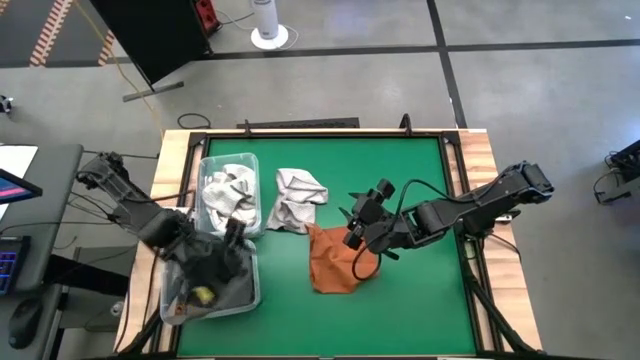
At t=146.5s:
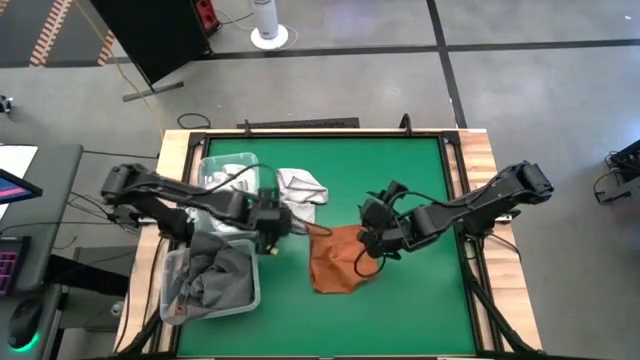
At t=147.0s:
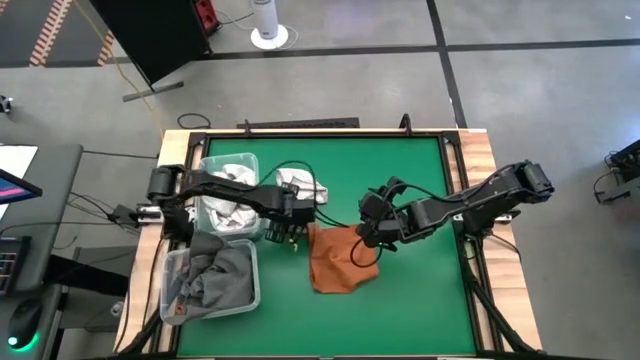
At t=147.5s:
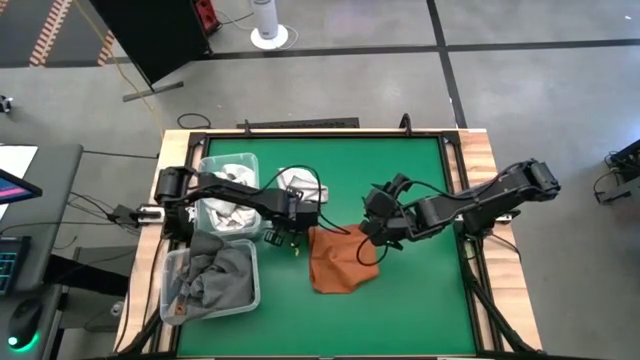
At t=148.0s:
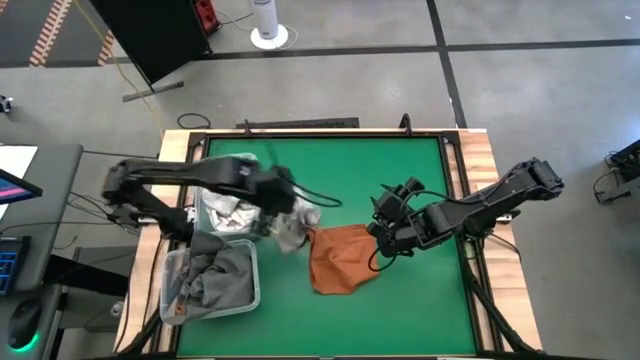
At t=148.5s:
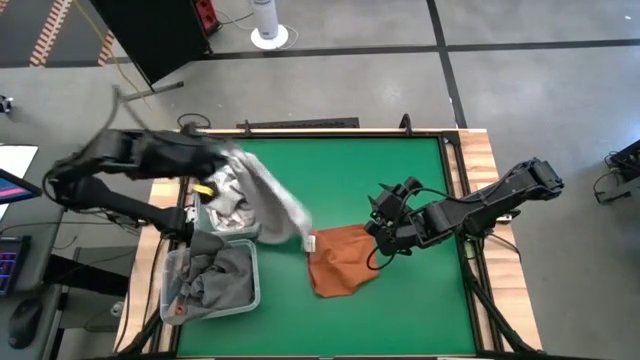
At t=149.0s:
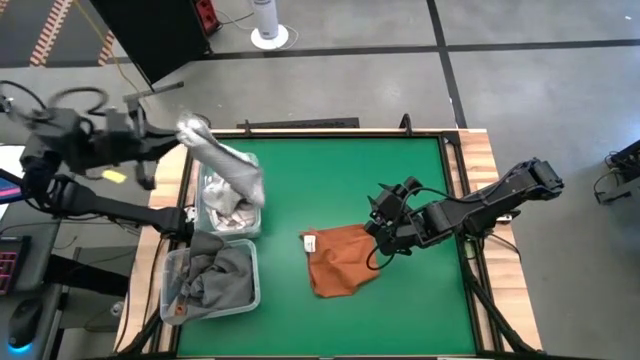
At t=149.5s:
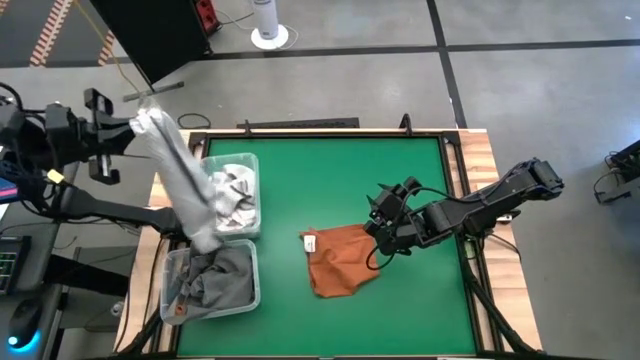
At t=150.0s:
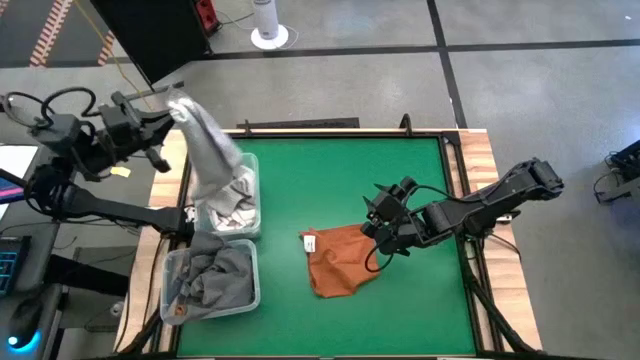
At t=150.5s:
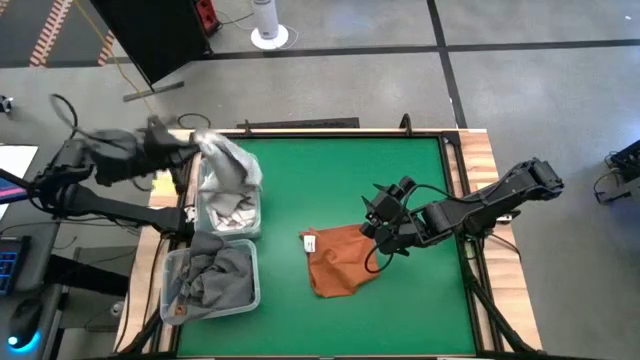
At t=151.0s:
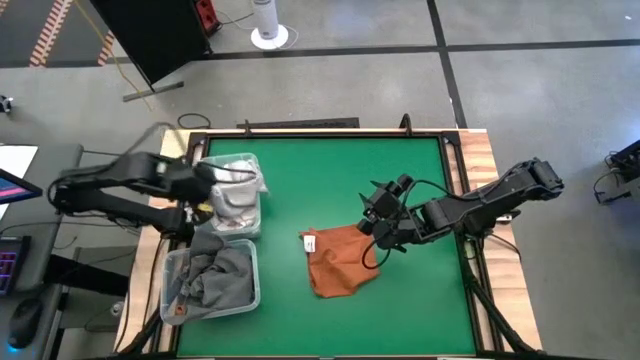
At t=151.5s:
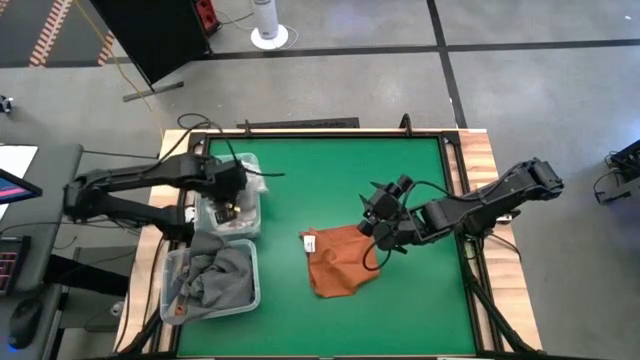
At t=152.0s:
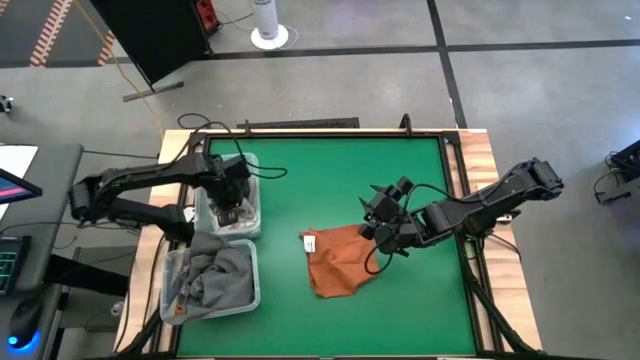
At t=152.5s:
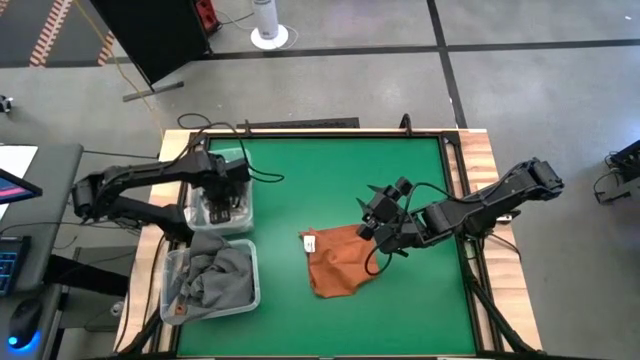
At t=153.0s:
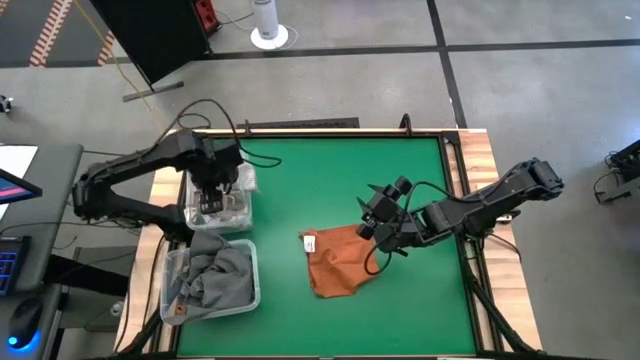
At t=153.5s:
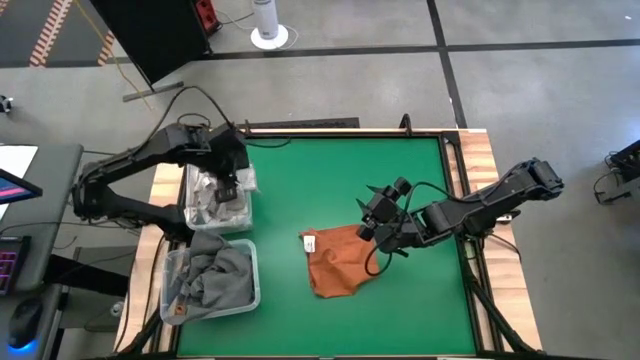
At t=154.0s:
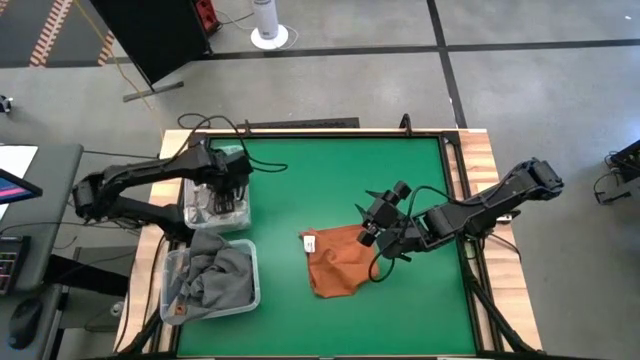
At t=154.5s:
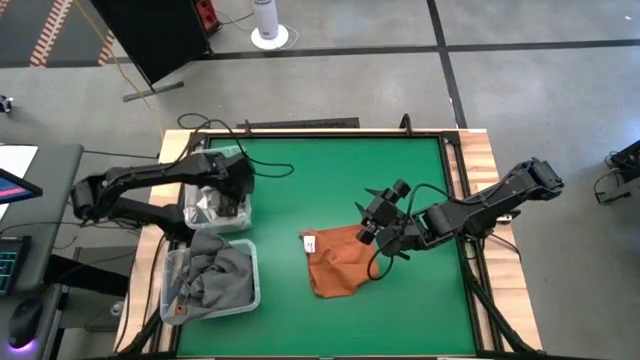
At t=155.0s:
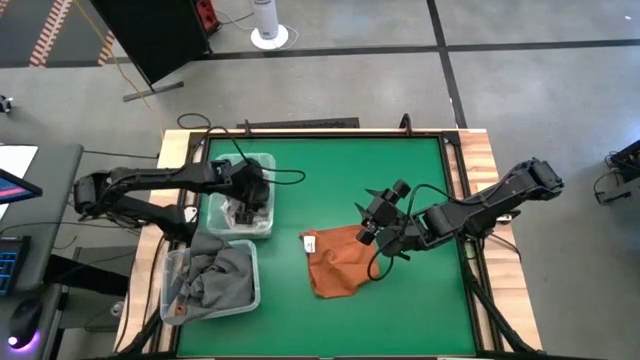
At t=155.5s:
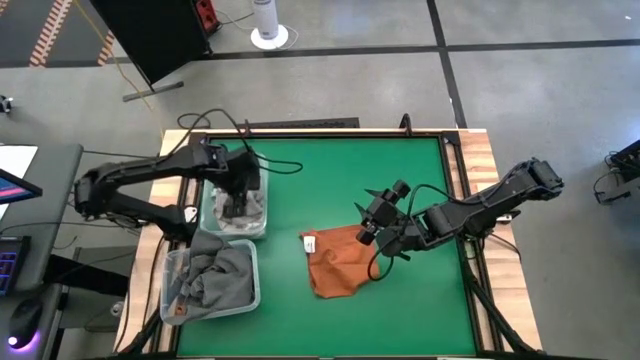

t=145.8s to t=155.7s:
Task: Sort towels by color in basket
Put the white towel into the top transparent bin

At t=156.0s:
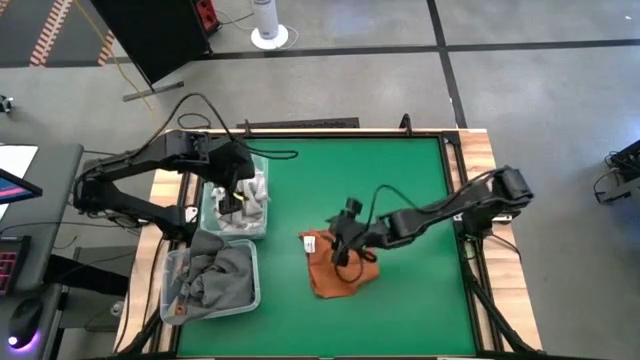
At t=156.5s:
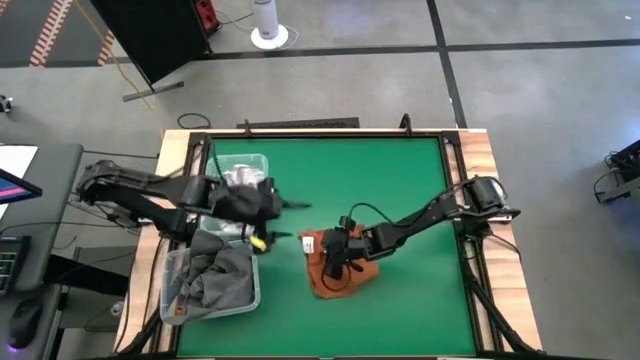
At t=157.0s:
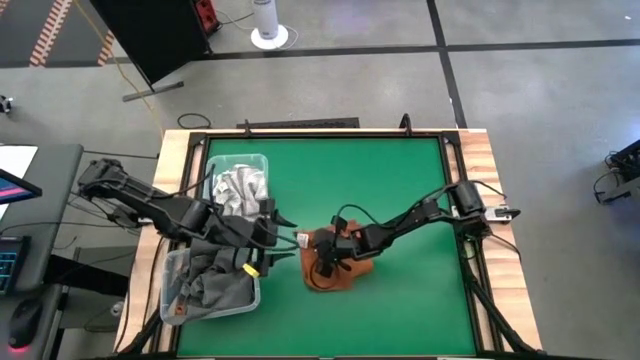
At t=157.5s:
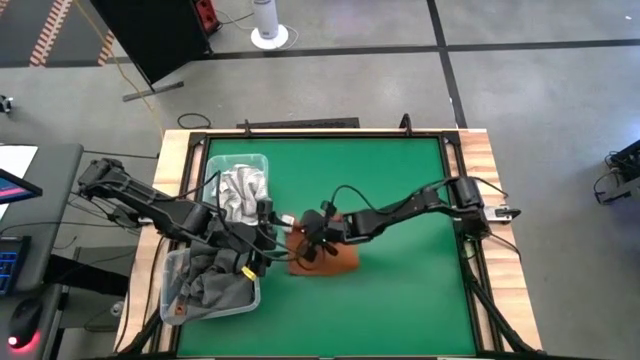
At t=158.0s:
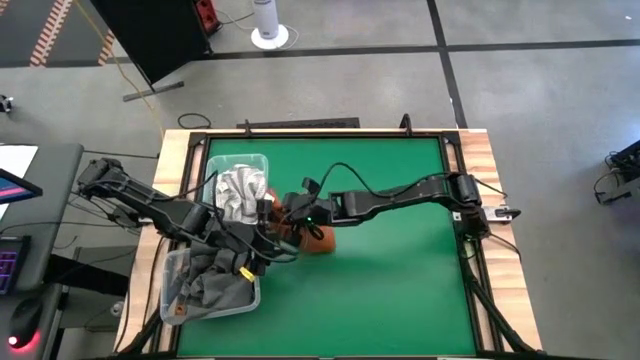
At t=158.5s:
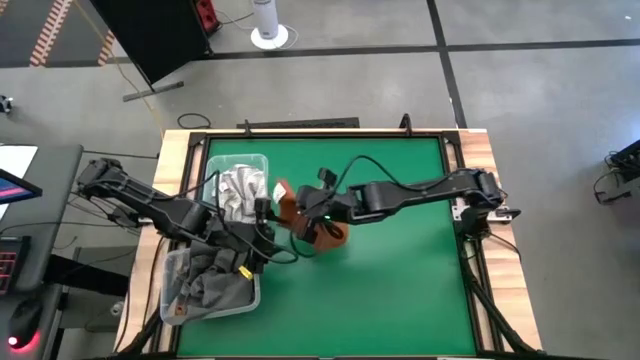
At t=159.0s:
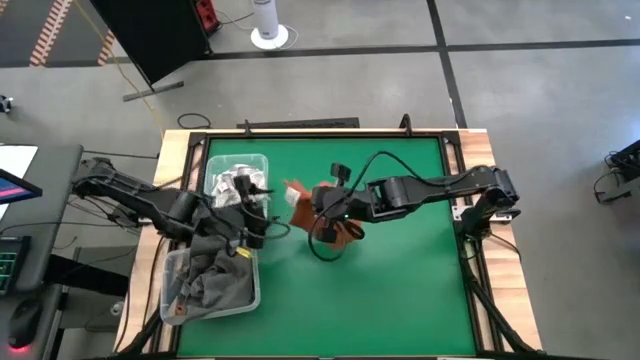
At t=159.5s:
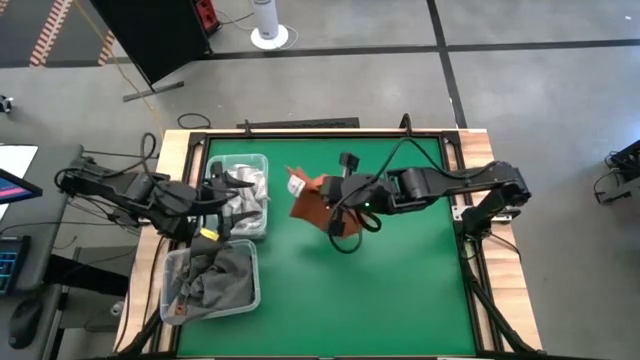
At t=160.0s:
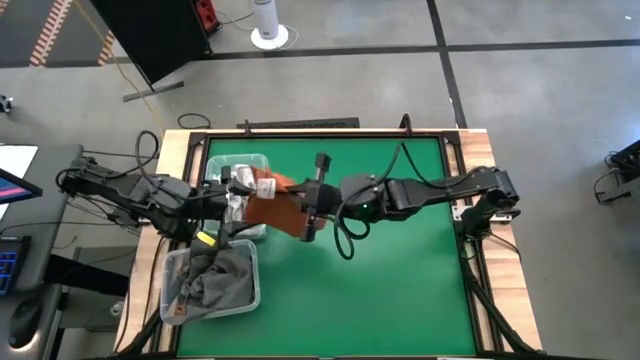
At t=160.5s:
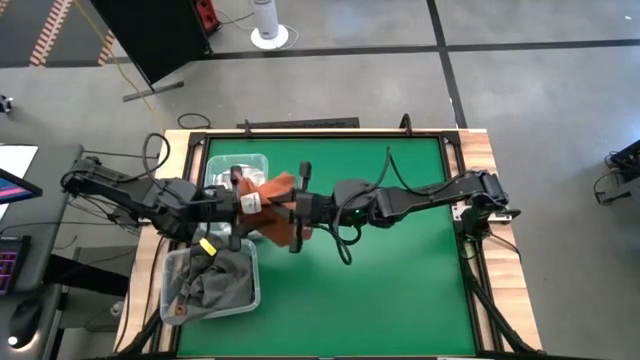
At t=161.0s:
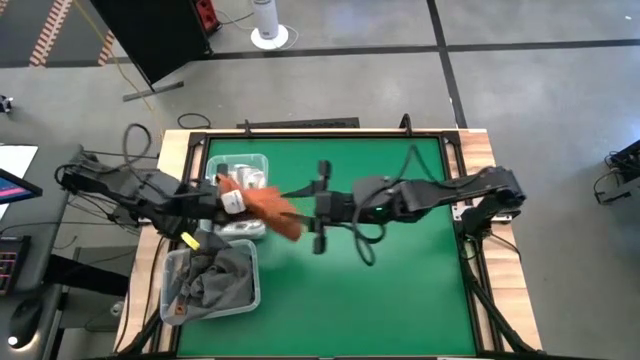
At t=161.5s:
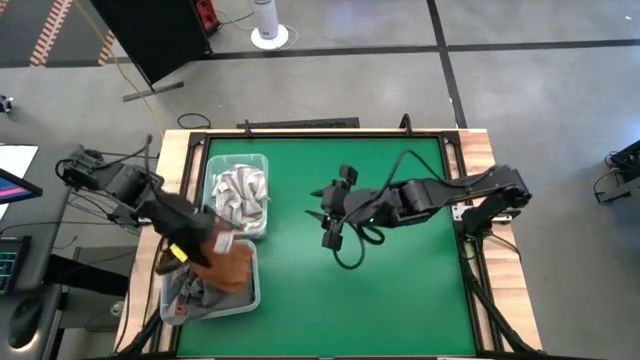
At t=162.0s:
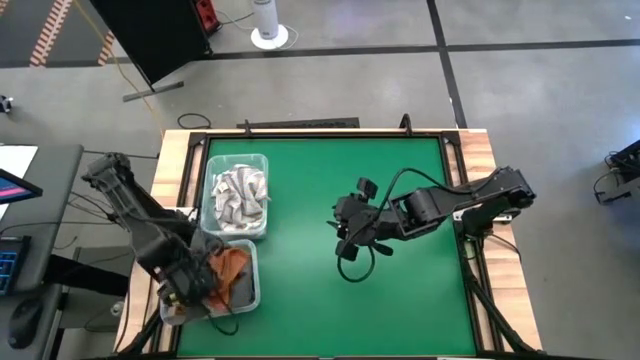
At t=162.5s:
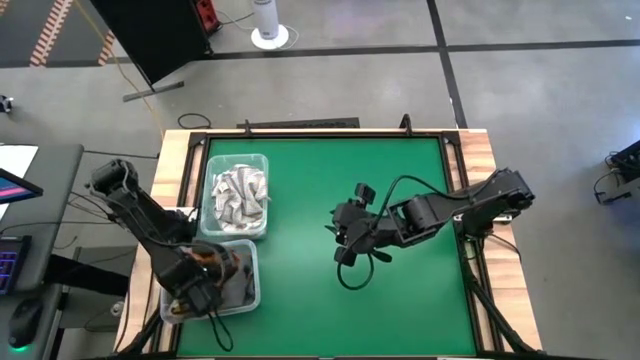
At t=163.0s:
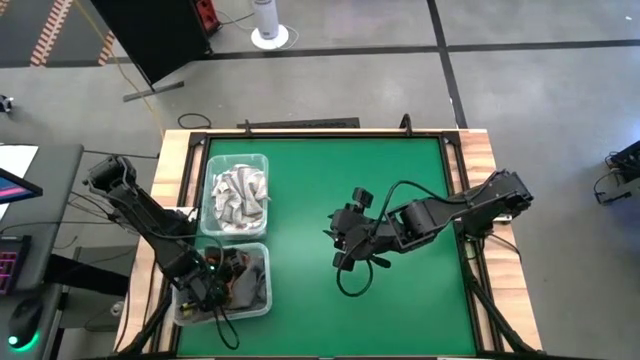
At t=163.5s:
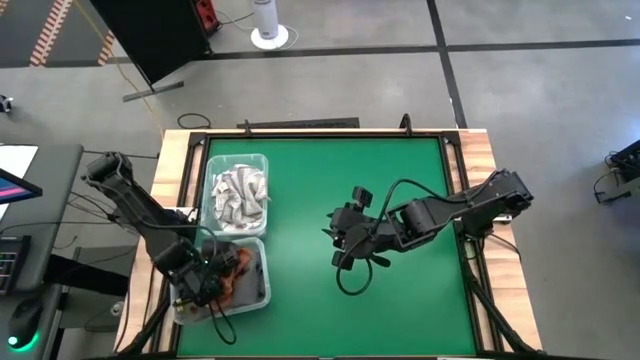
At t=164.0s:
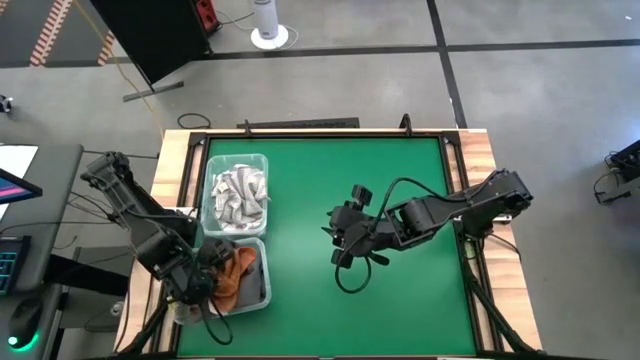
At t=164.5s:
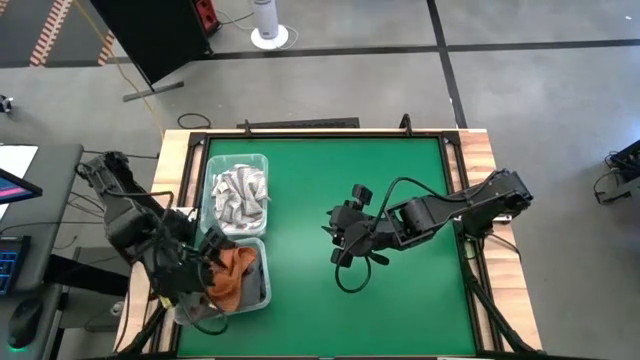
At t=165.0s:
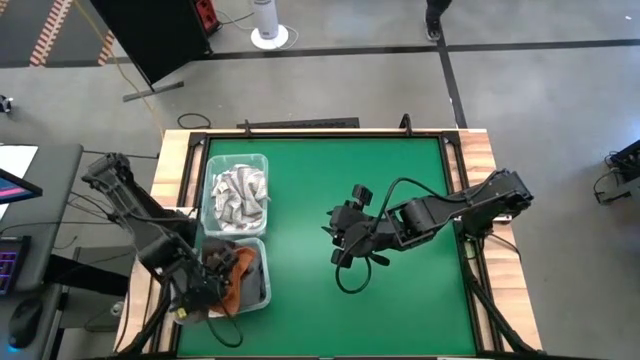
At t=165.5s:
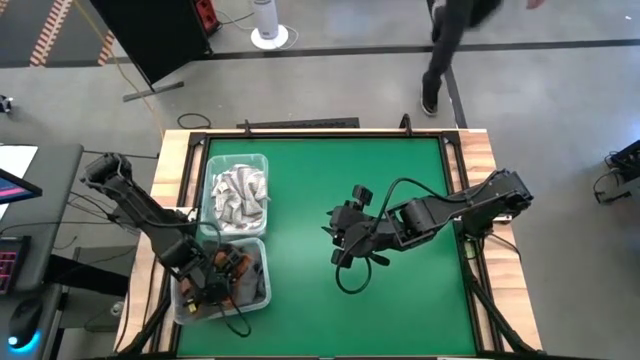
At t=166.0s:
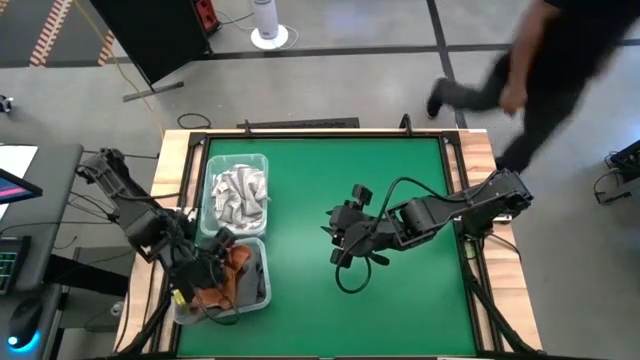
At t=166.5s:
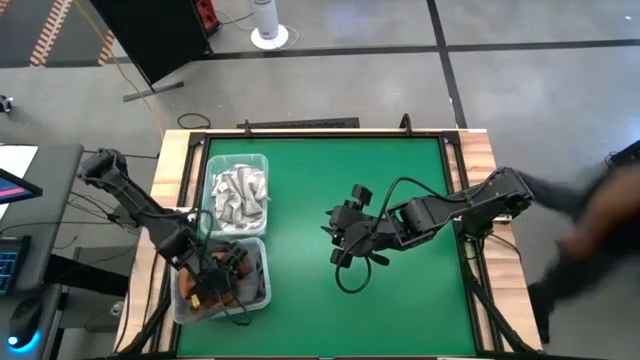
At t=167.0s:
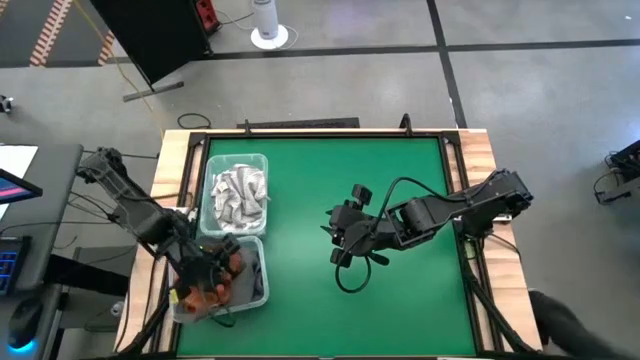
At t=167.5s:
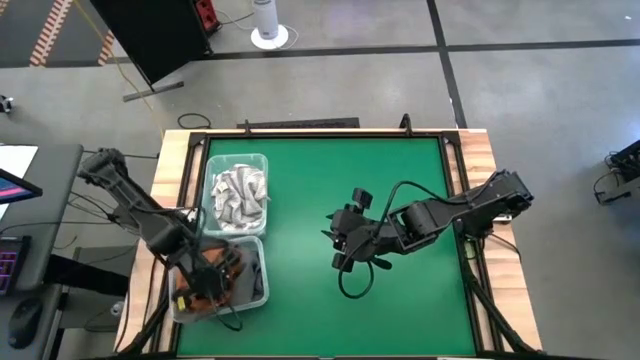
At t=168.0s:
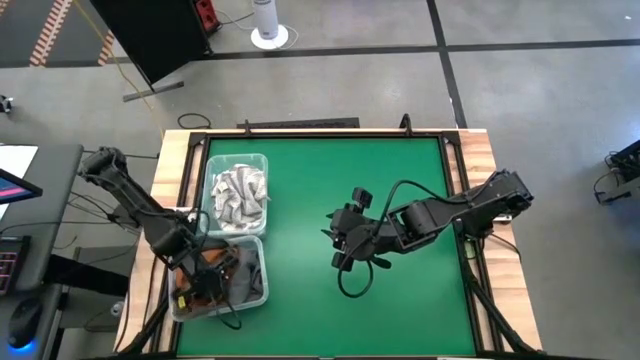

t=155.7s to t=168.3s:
Put the orange towel into the bottom transparent bin
